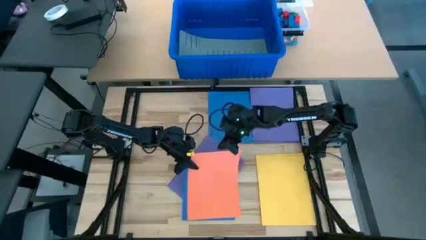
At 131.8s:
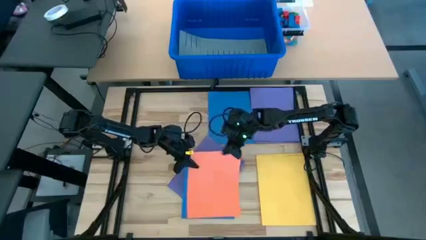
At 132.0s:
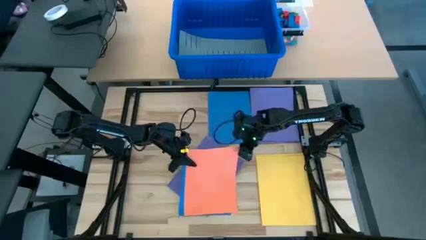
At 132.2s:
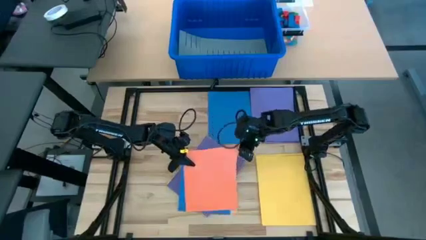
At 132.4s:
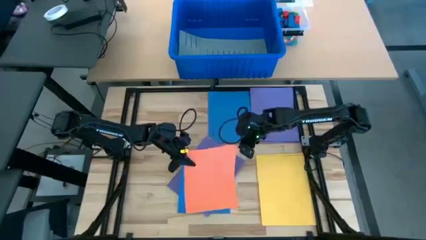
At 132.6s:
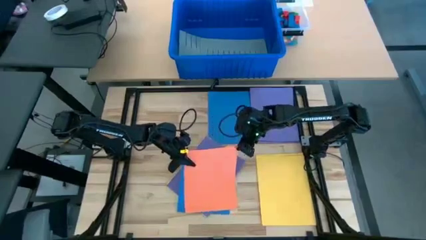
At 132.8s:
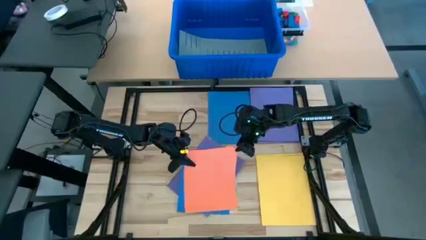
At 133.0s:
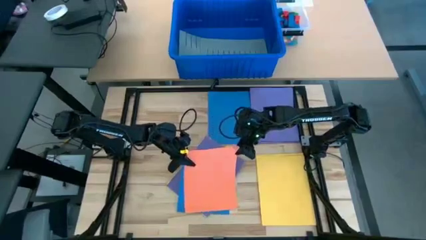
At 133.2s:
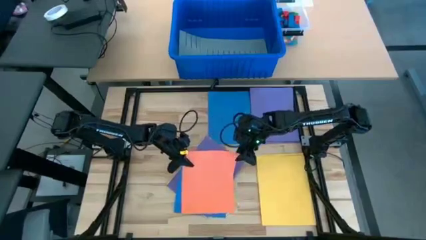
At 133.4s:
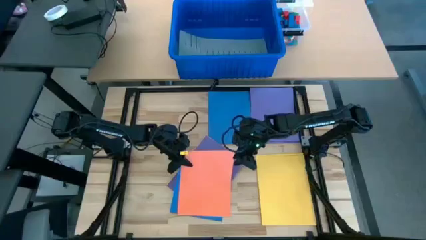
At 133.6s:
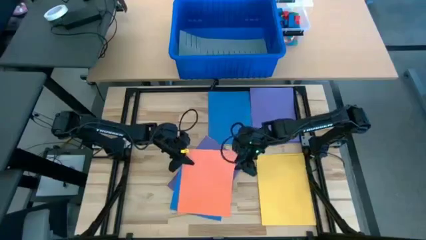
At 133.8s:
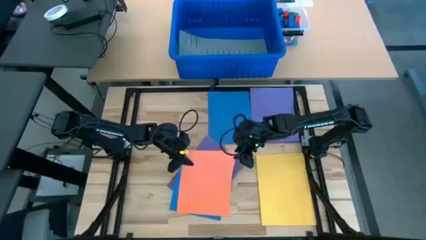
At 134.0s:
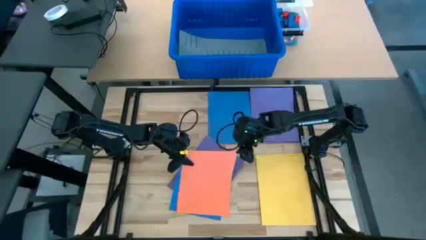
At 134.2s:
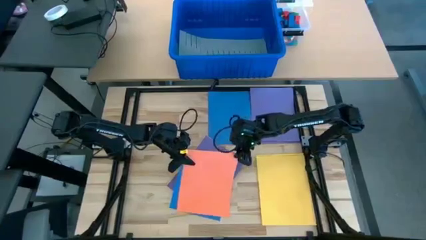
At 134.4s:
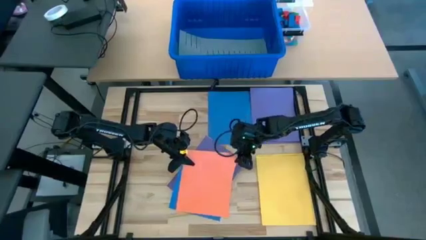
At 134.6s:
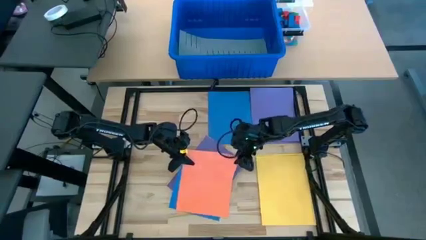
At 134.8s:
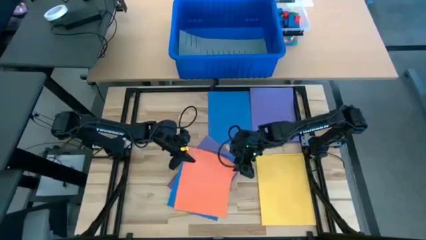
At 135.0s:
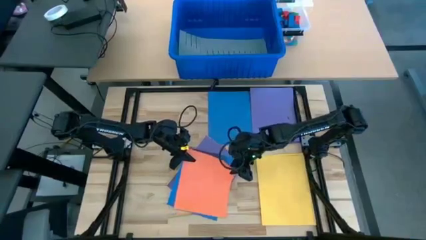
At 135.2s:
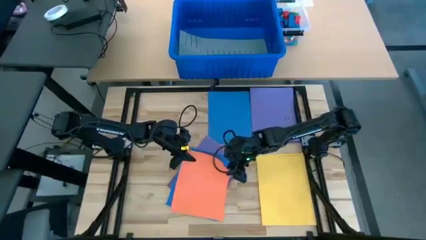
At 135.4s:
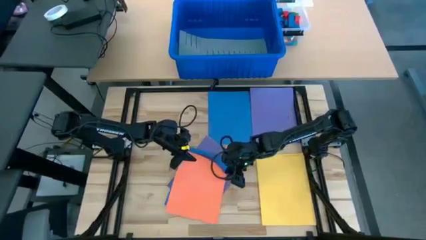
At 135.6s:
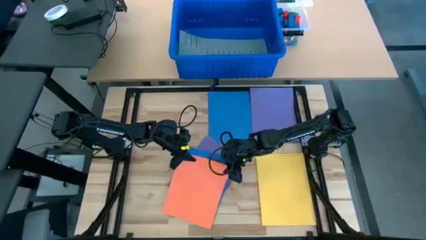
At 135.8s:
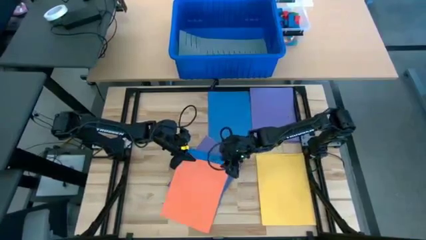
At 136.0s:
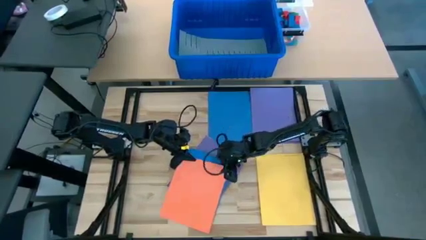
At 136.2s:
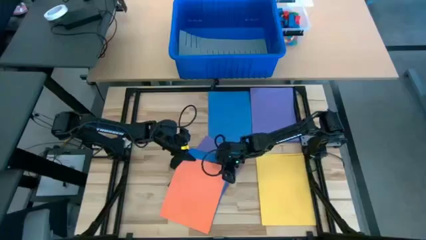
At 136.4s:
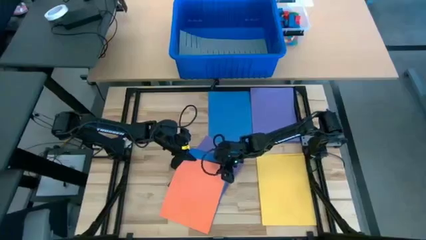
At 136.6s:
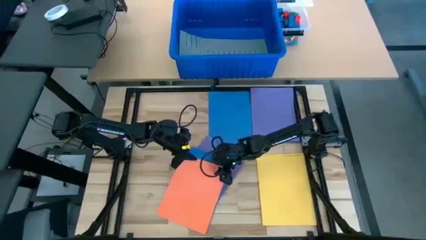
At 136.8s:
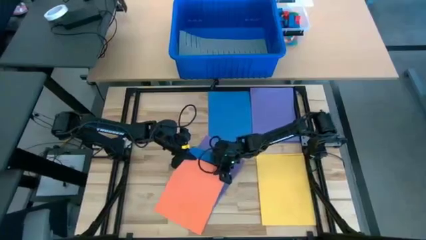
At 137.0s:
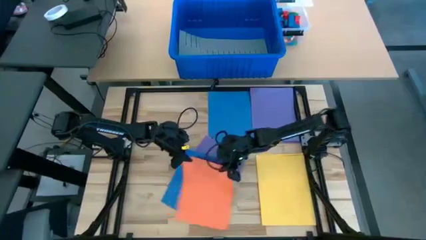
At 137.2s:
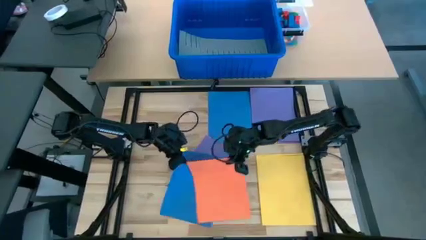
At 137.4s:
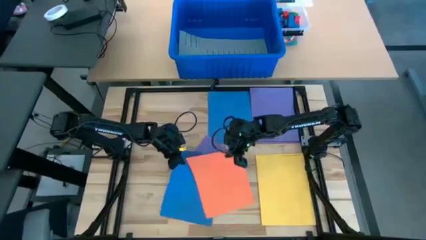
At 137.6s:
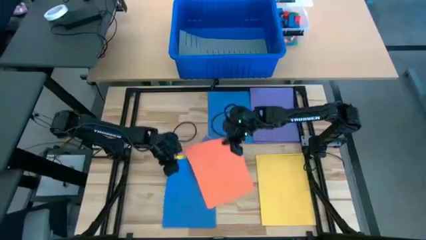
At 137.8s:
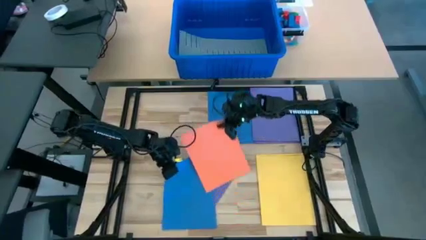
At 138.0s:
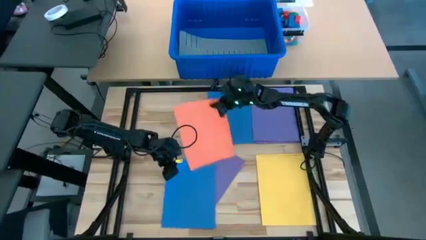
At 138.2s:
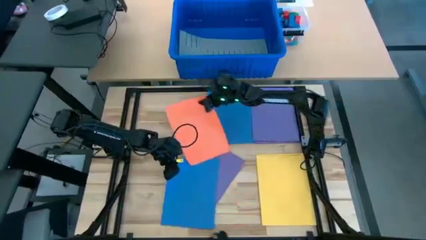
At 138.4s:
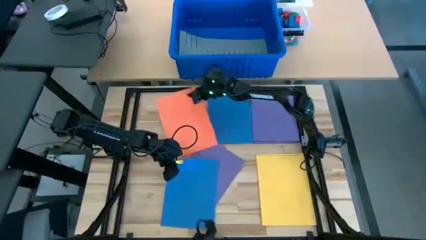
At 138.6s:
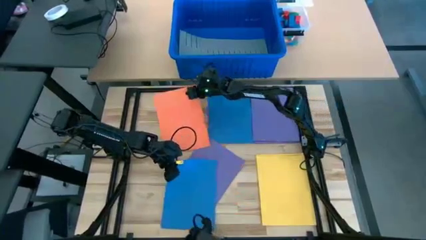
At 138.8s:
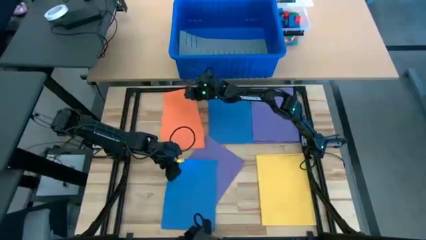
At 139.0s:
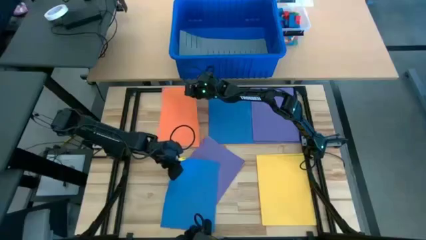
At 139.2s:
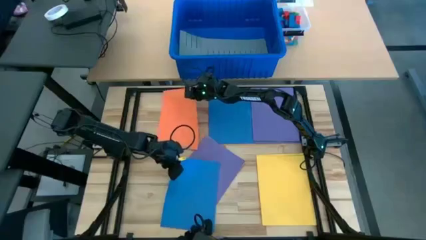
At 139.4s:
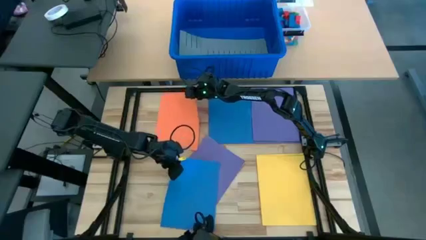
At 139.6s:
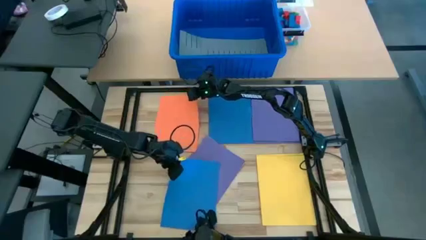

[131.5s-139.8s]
Task: Organize paper
Put the orange paper on the table

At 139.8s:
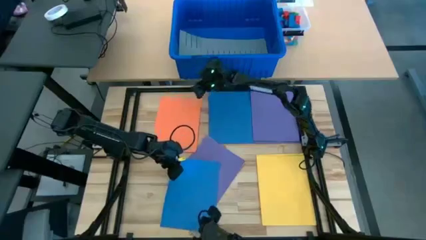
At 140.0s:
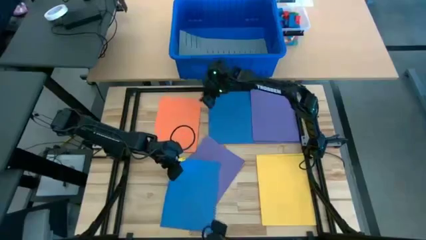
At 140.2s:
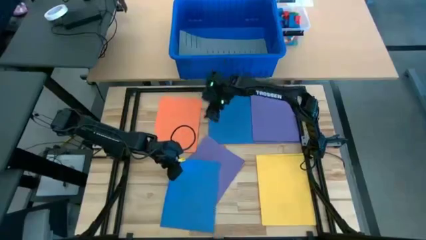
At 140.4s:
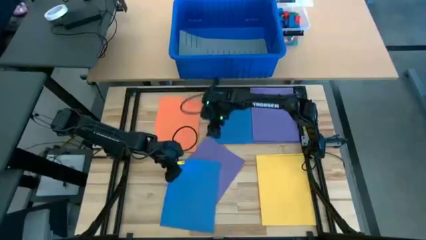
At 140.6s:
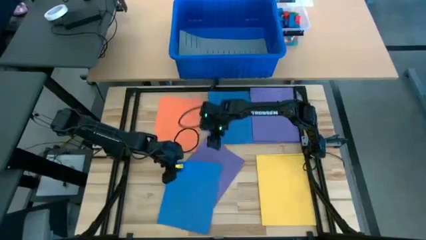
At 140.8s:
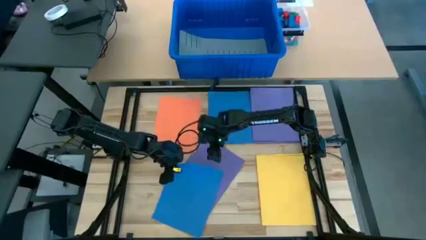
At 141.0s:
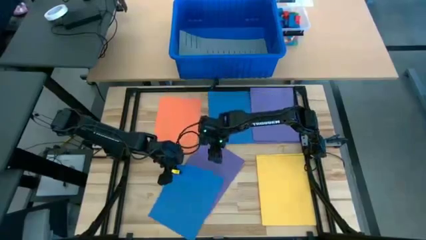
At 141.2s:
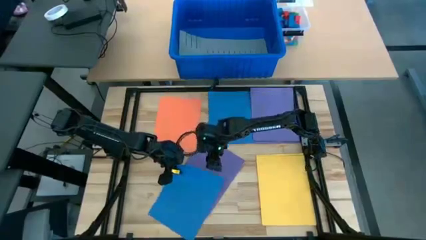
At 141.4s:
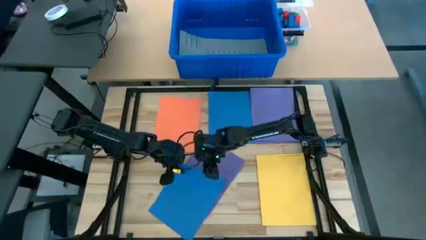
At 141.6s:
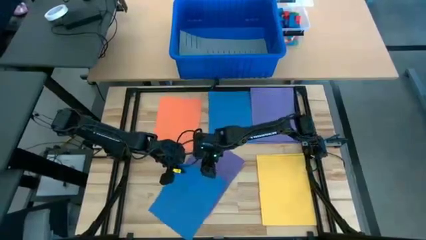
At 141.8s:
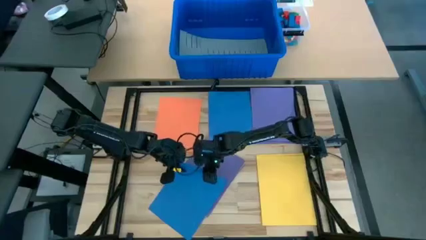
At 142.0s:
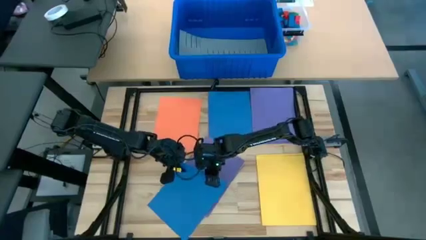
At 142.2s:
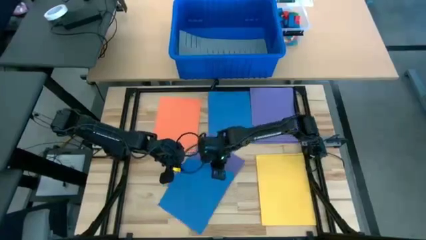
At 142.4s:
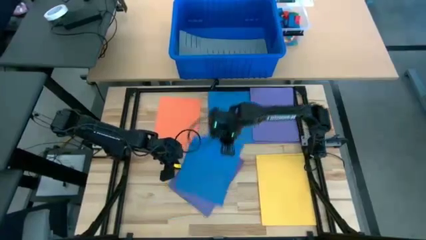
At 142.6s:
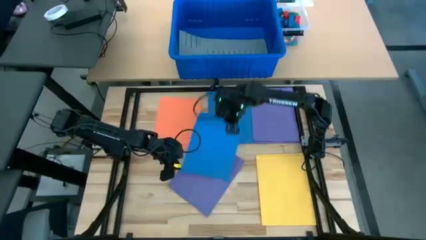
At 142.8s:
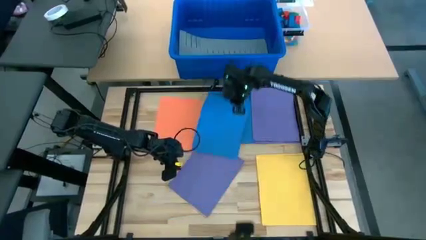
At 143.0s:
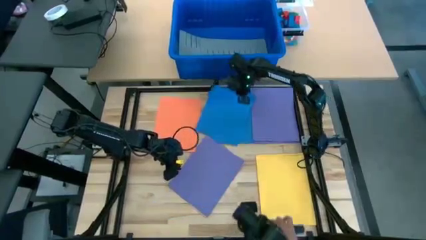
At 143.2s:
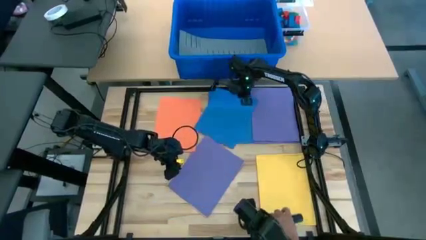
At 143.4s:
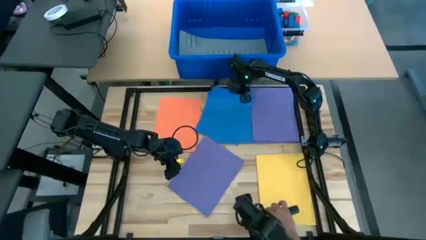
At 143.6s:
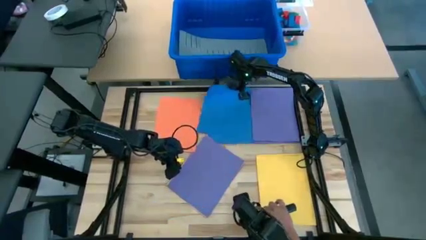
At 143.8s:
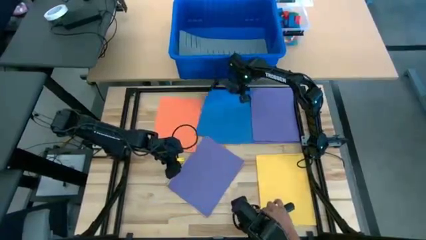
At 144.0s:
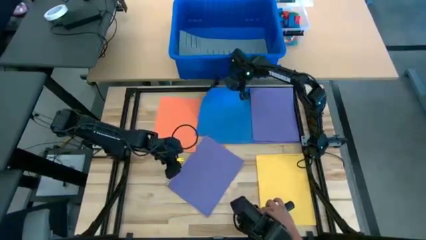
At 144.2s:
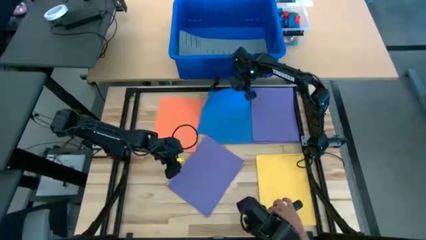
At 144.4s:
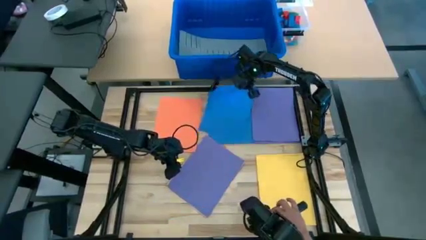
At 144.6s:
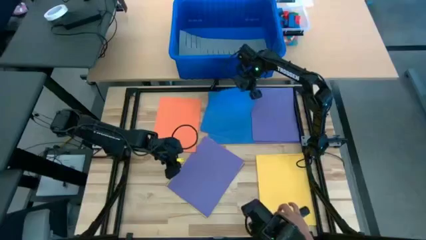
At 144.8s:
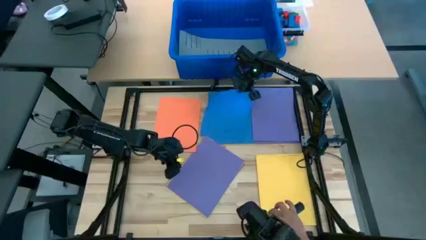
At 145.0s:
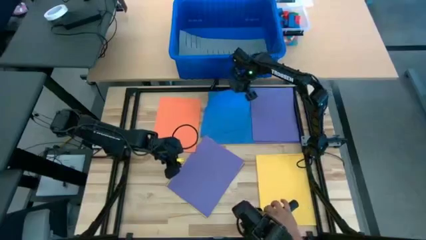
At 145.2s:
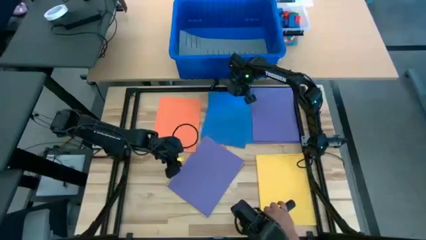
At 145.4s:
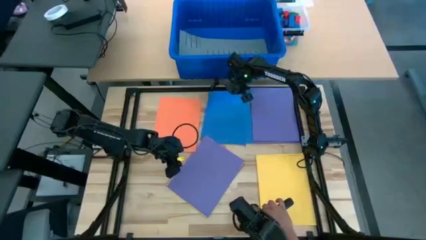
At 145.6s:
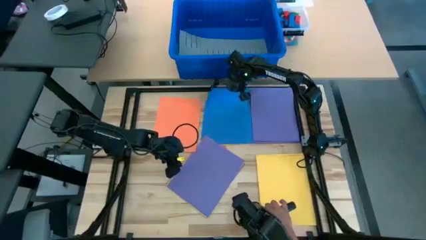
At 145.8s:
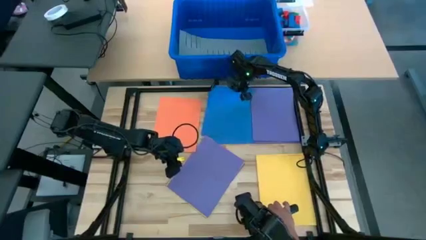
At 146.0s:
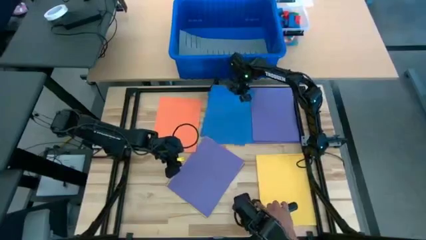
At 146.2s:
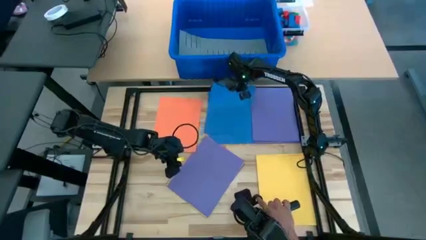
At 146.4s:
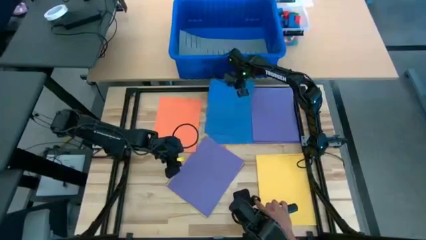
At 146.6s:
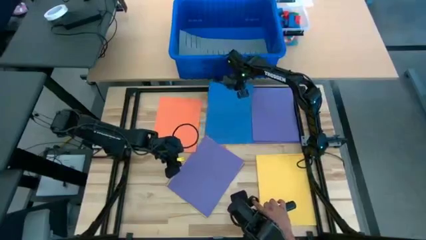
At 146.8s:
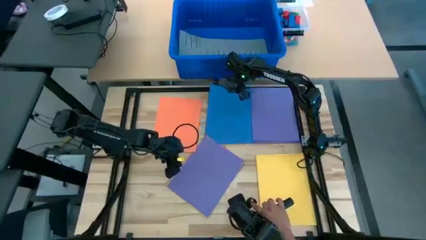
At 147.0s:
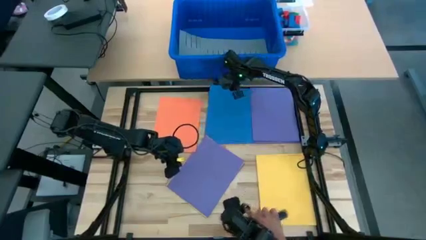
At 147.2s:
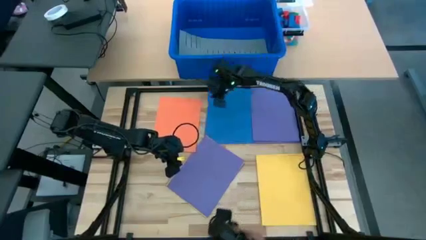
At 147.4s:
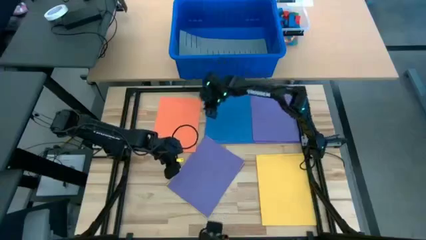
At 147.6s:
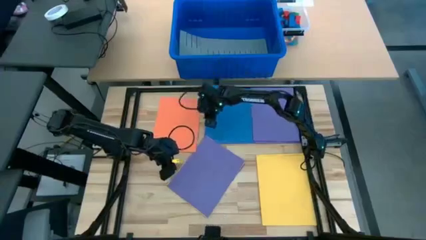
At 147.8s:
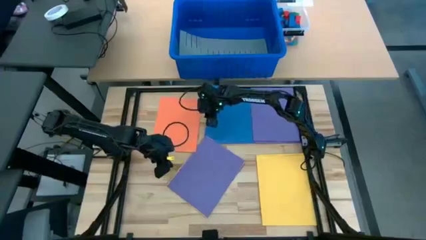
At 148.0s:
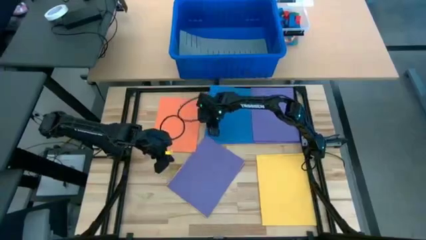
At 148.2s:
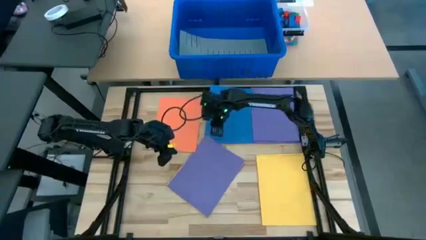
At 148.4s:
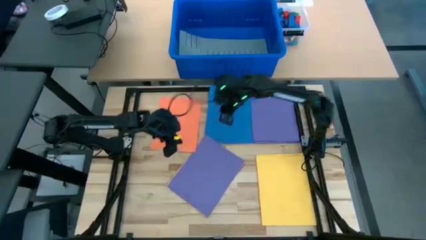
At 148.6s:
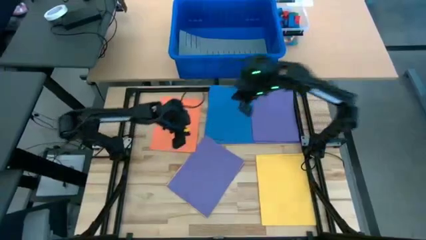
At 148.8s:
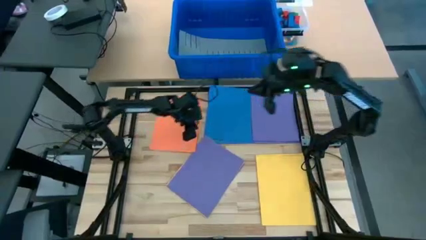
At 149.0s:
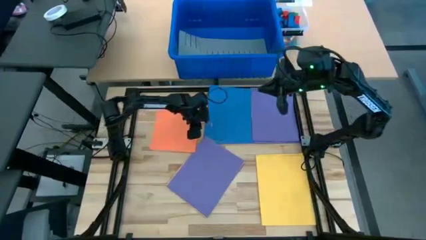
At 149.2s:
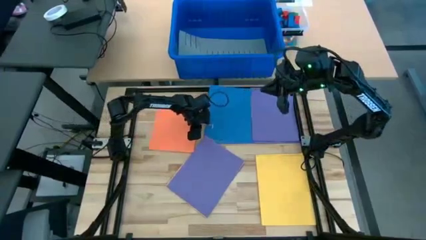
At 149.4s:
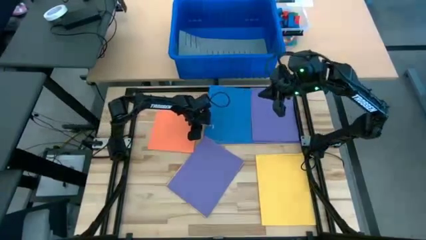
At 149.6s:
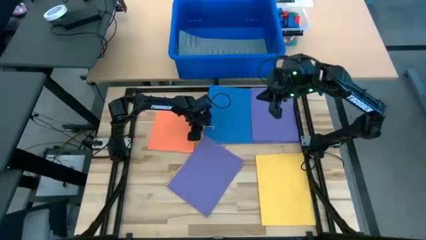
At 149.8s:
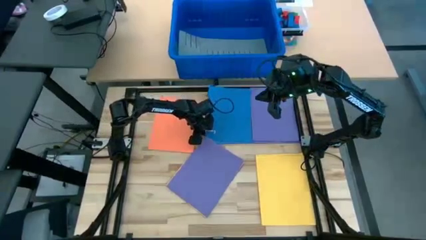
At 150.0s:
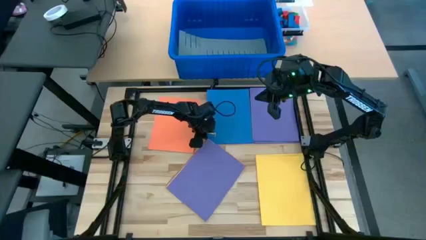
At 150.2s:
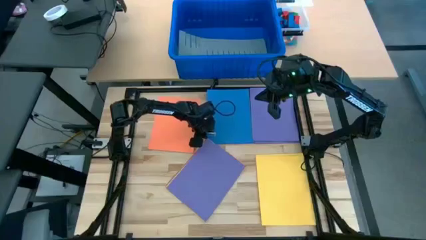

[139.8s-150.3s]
Stack the blue paper on top of the other blue papers
